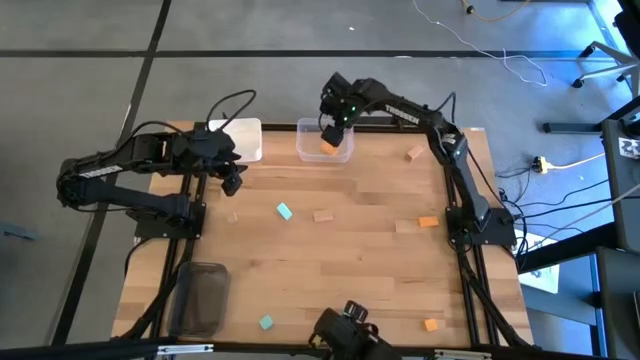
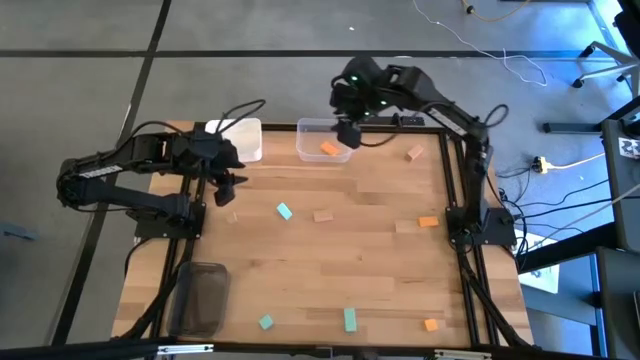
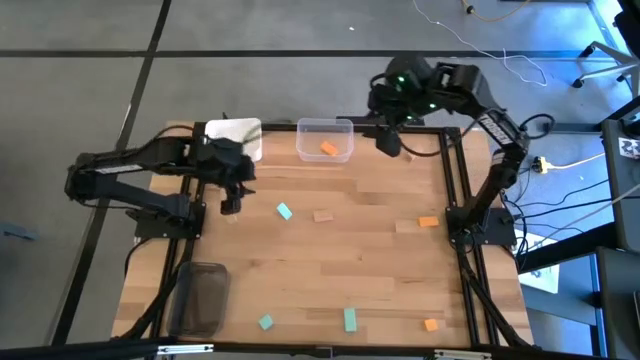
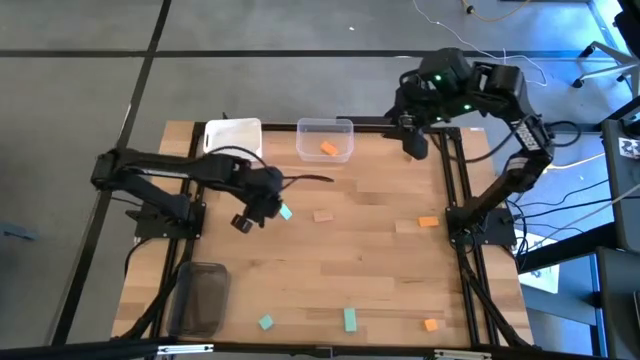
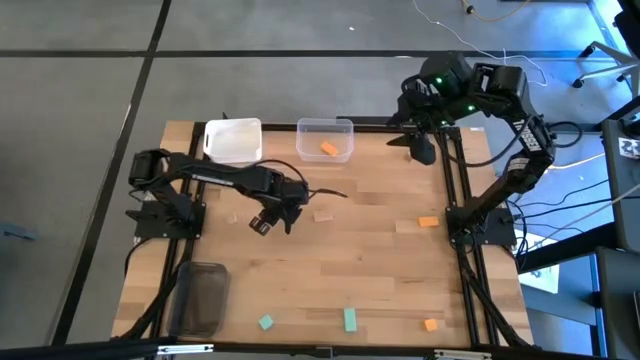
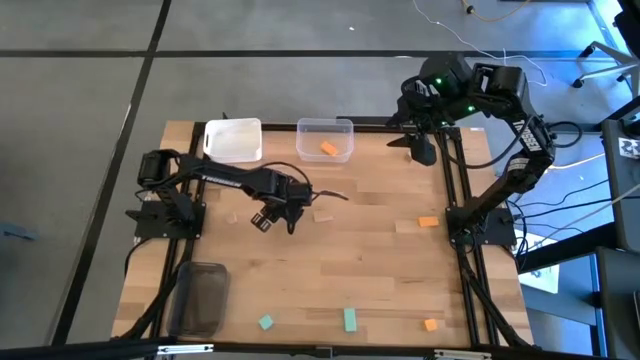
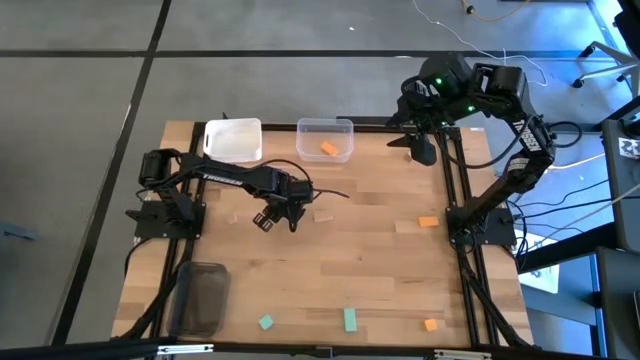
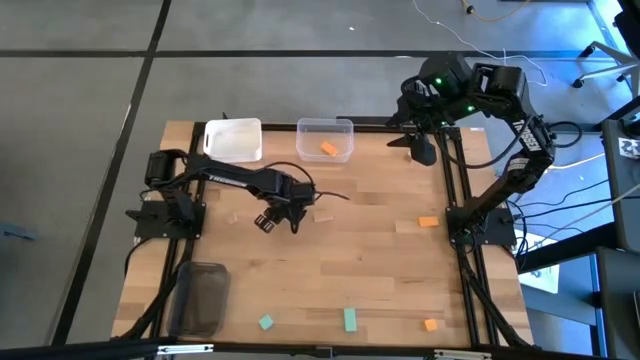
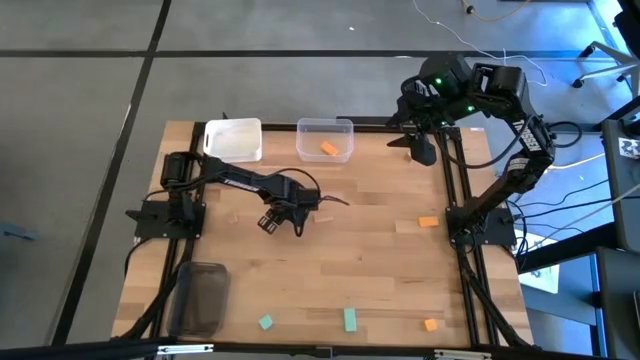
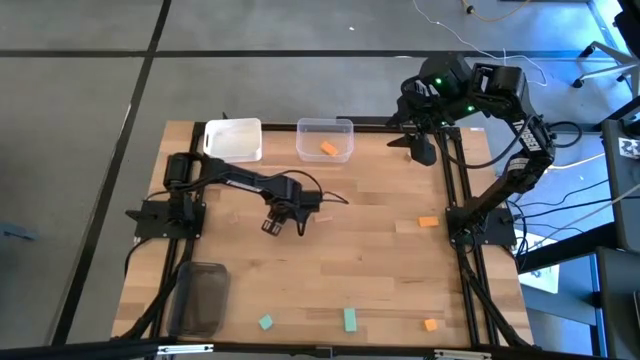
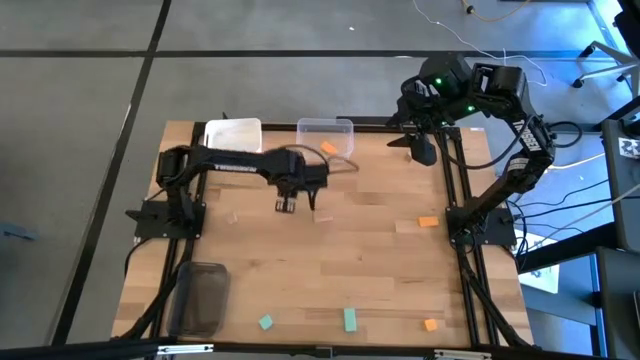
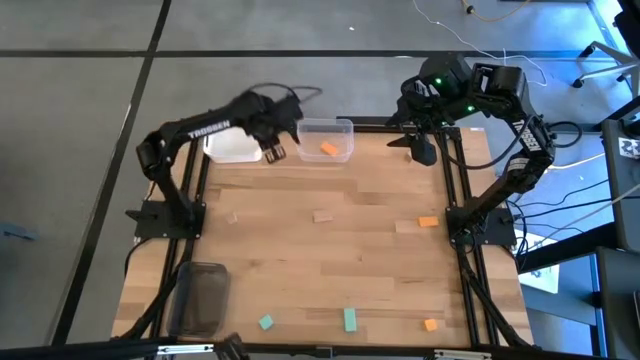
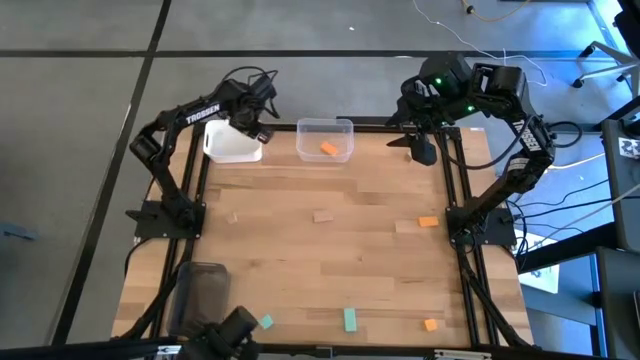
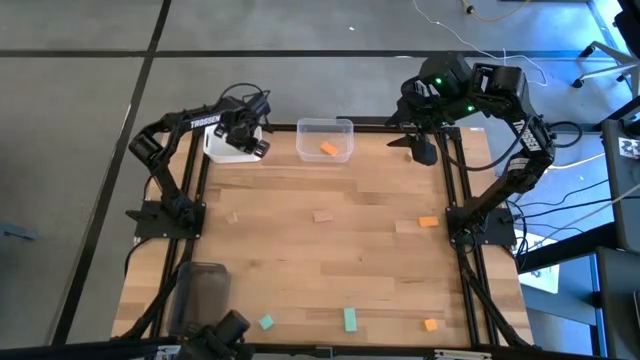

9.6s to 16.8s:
Task: Sort & place blocks by color
Put the top blue block into the white bin

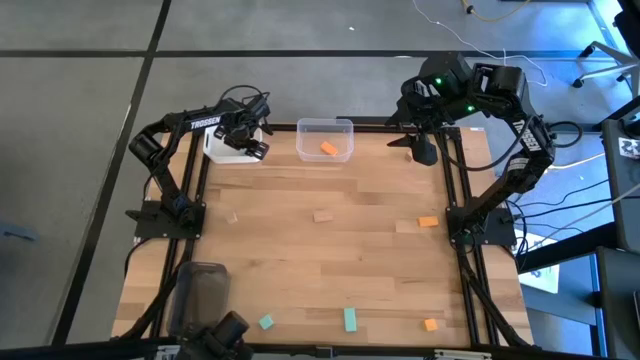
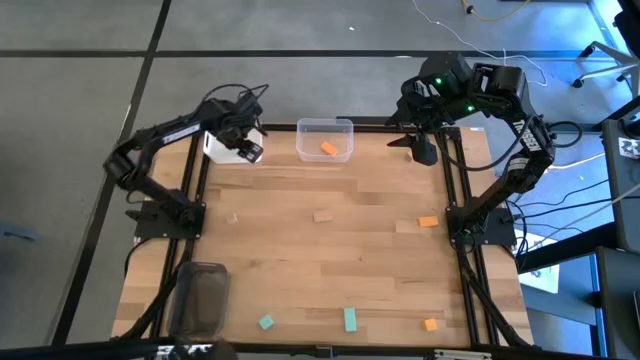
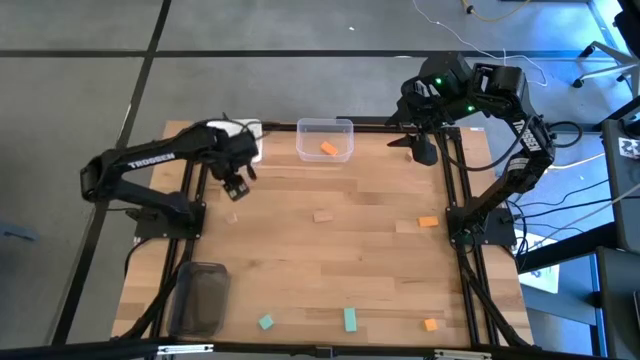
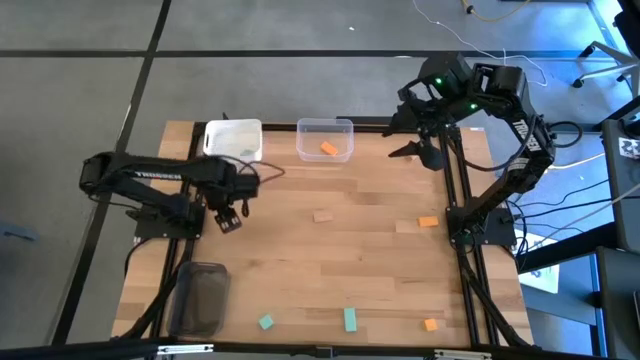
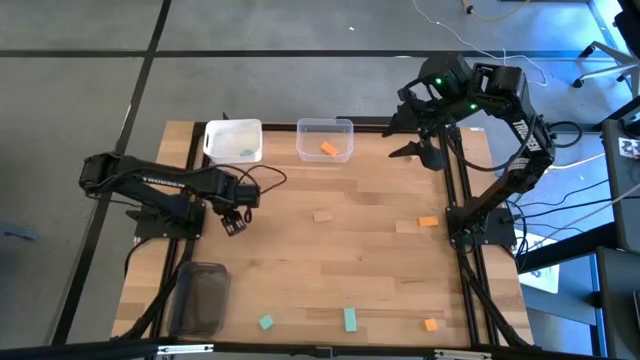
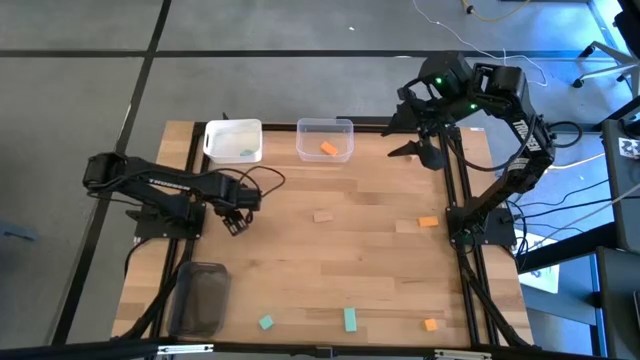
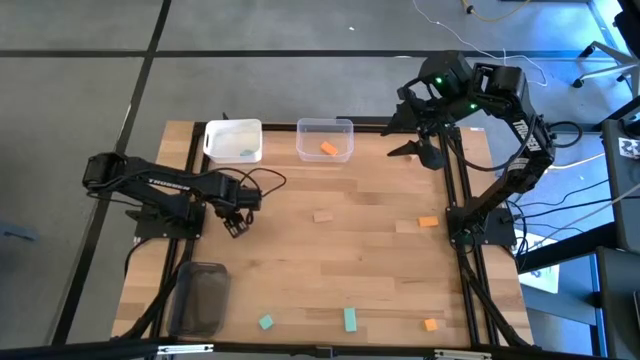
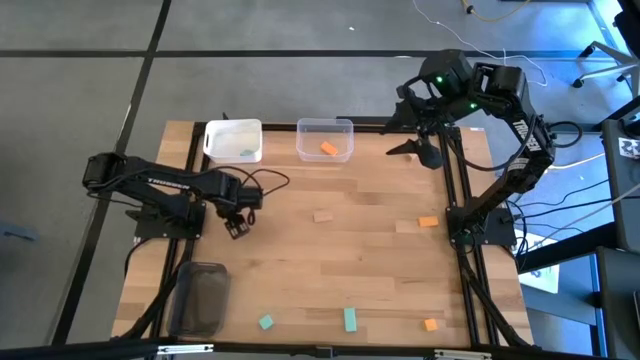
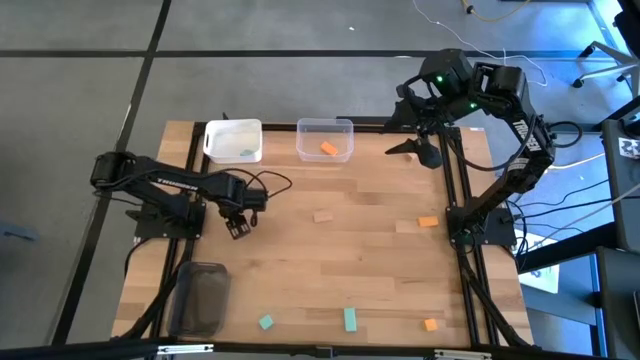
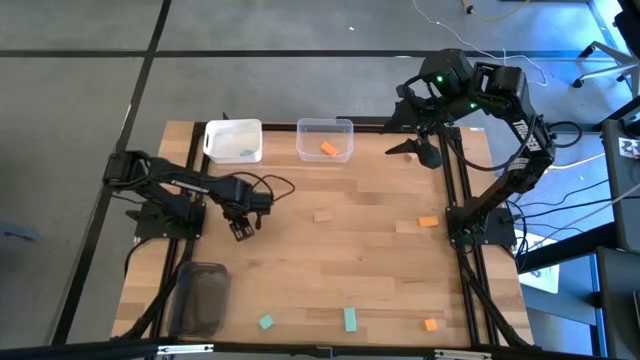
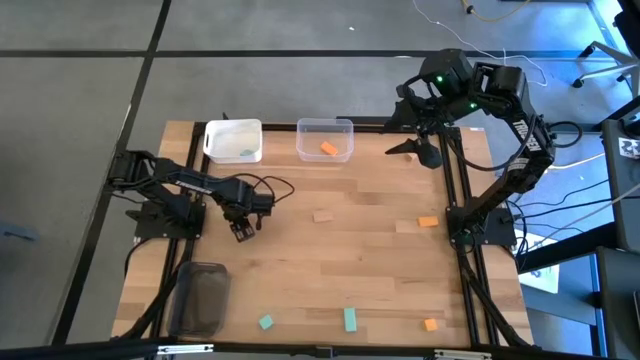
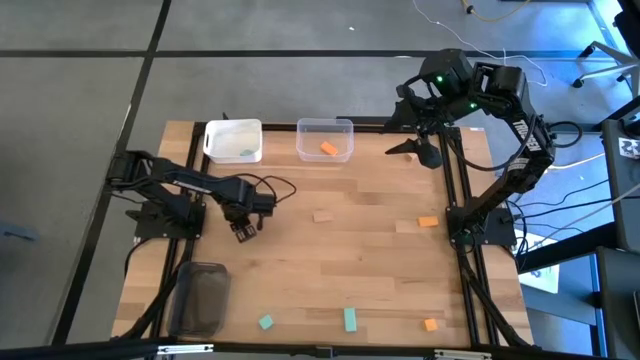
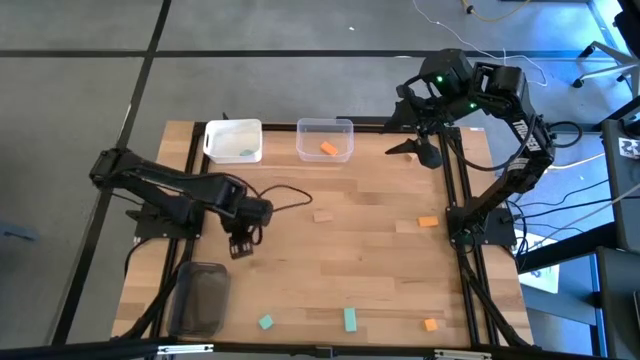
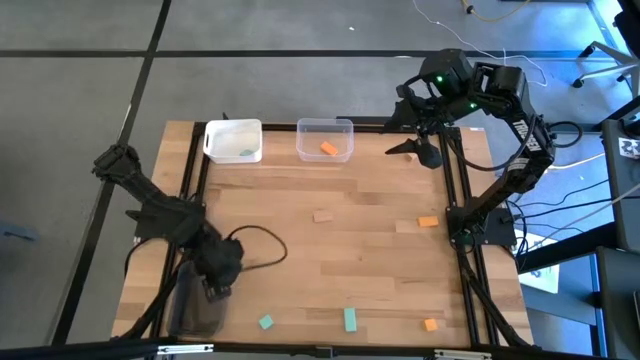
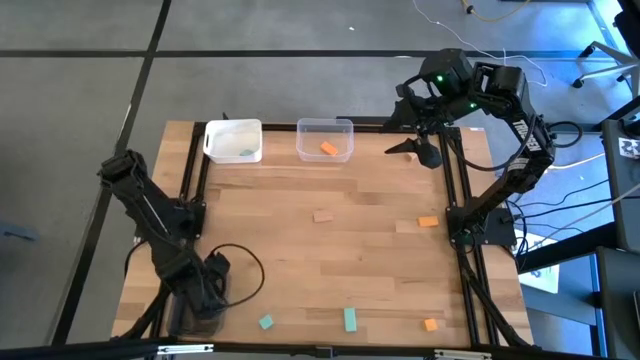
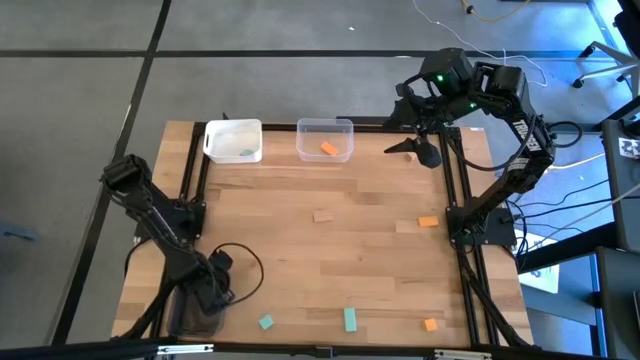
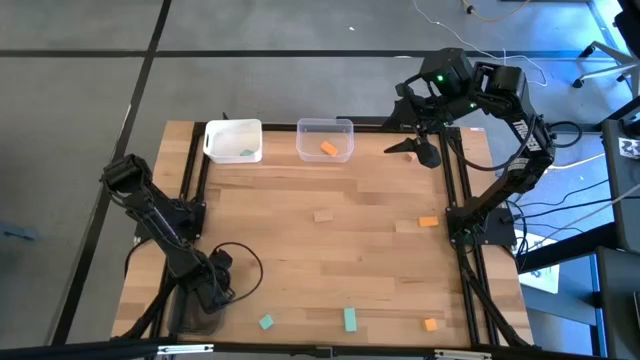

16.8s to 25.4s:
Put the bottom left brown block into the black bin

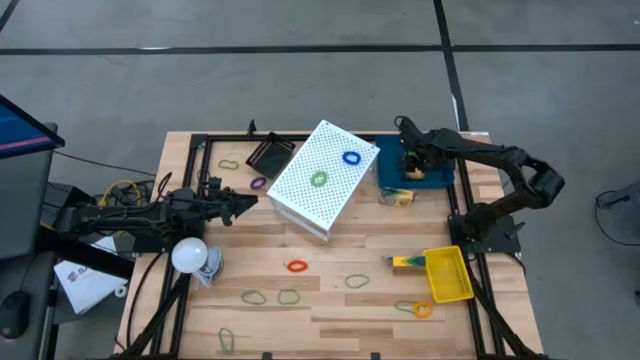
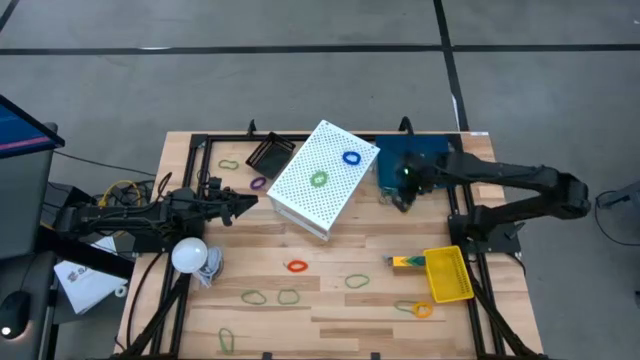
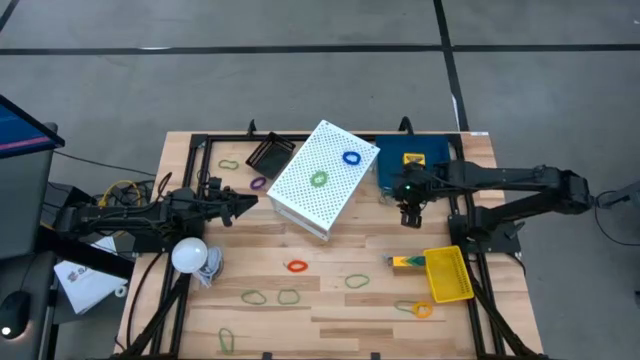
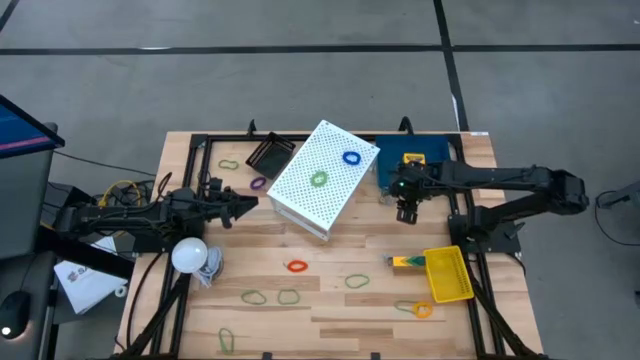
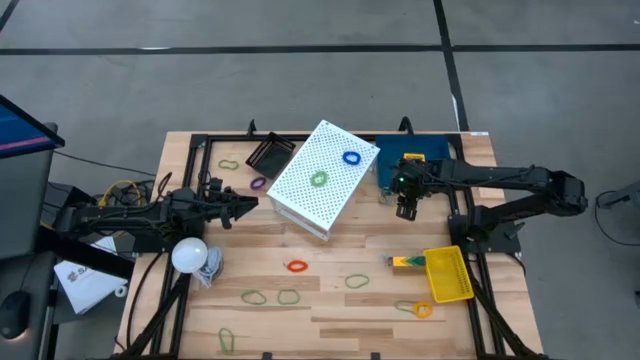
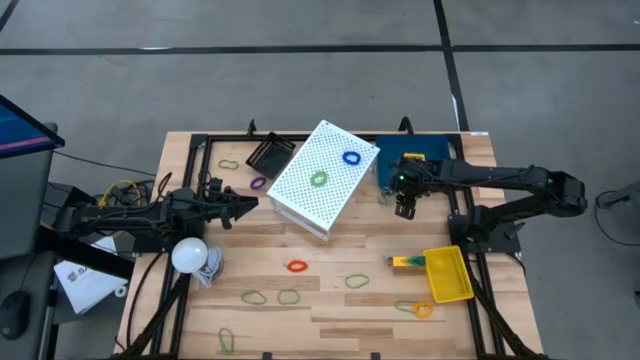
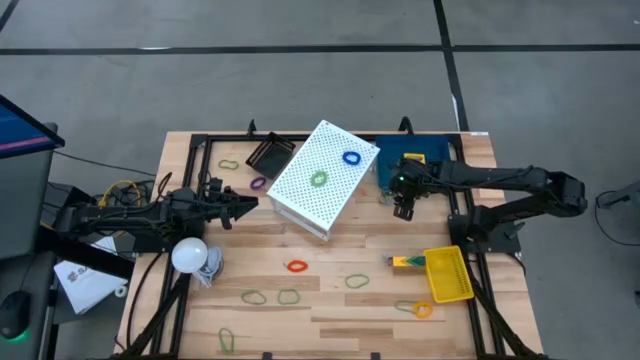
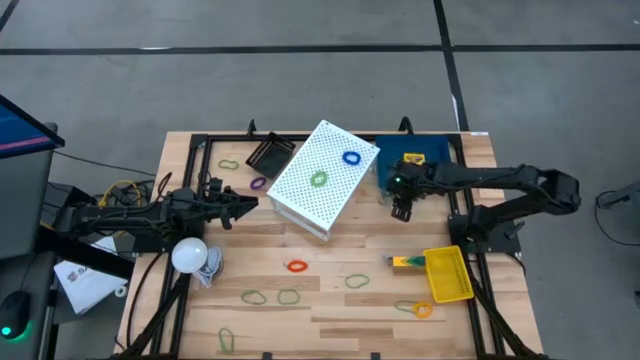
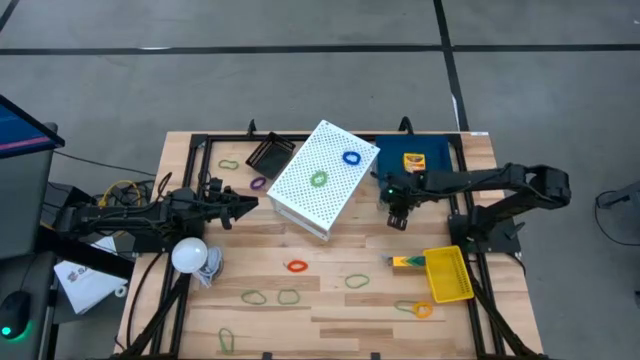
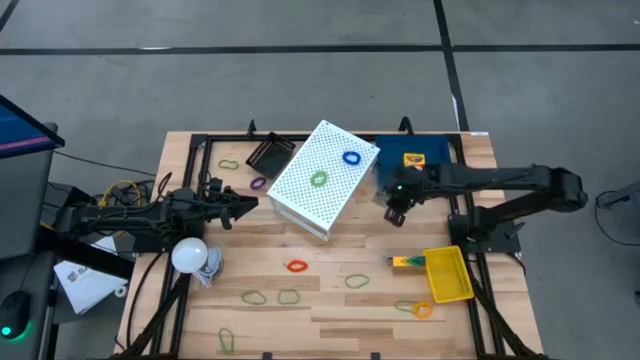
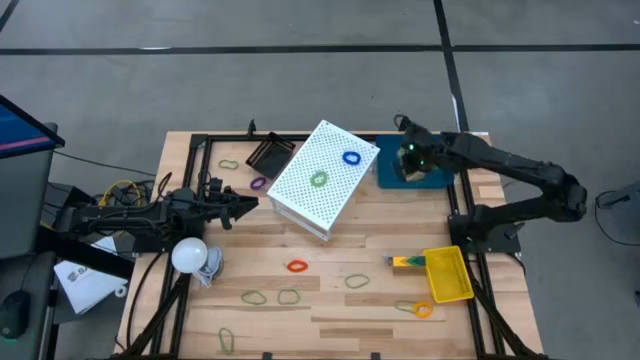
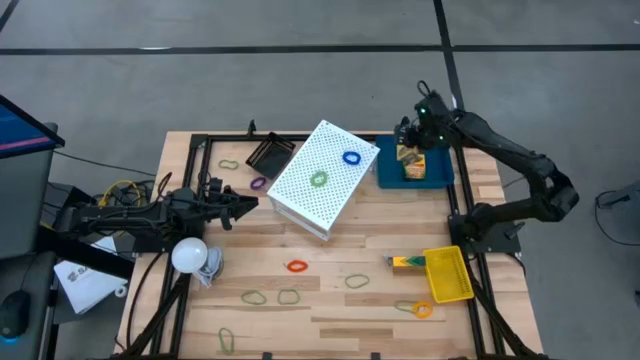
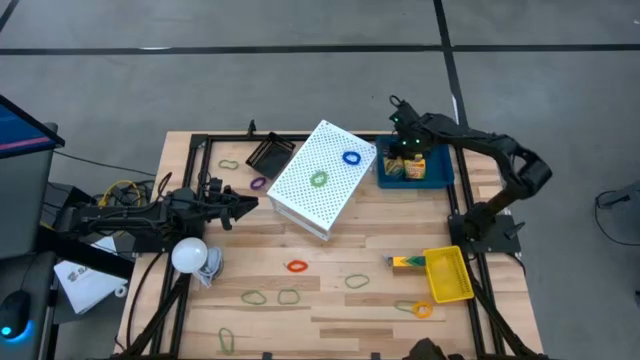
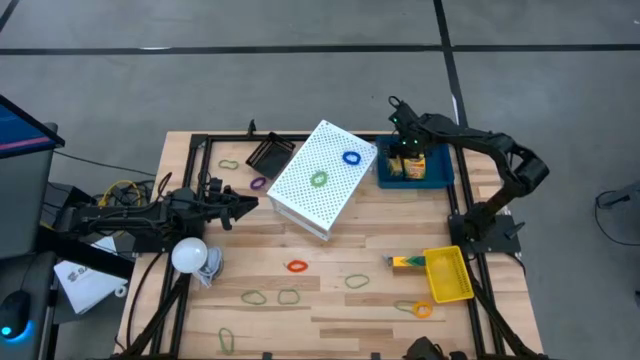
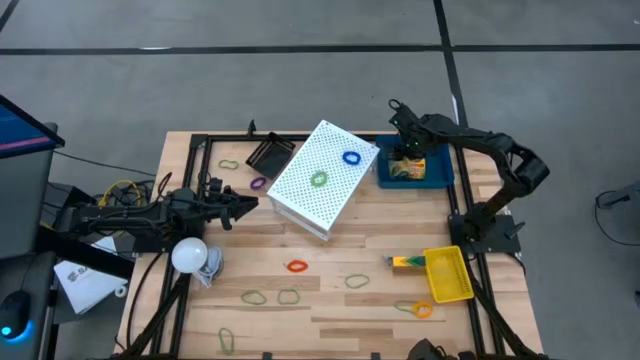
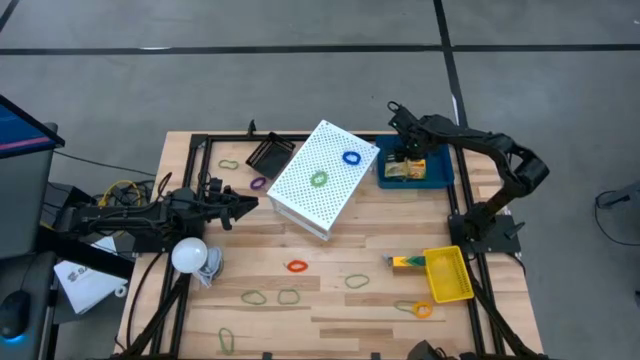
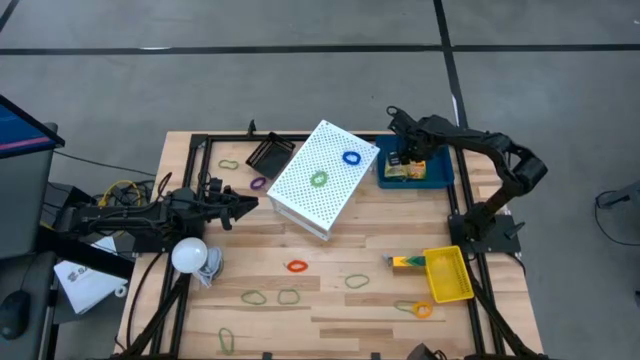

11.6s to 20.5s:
Task: Pick & Place Office Desk Supplies
Put the yellow box of crayon into the blue bin
